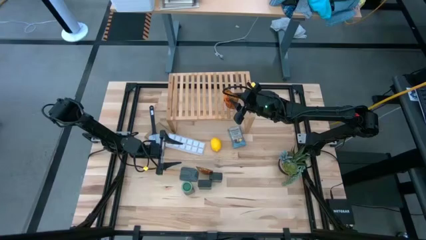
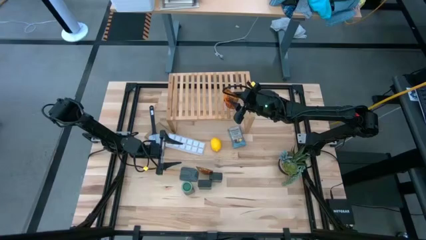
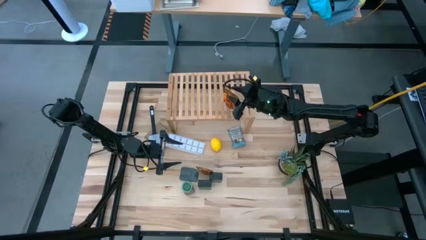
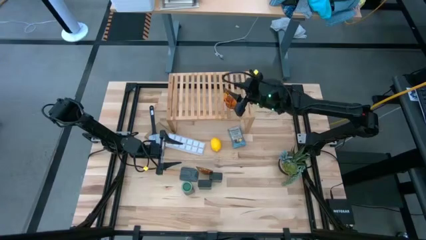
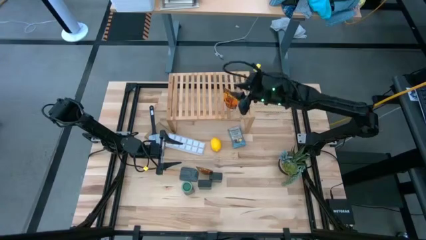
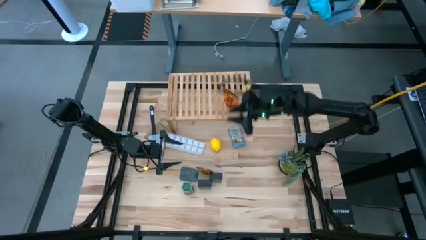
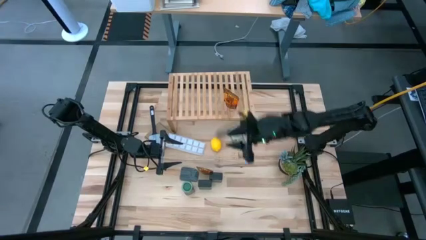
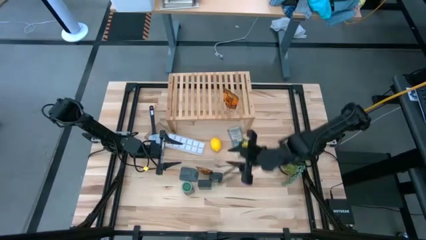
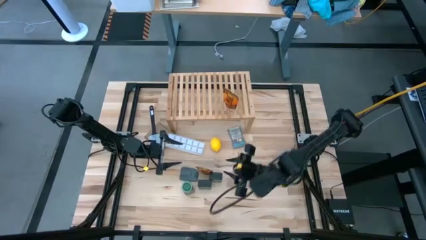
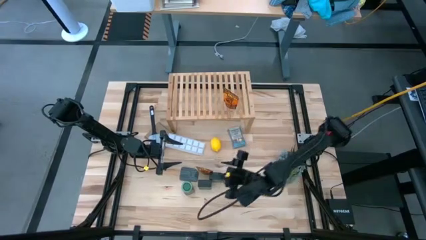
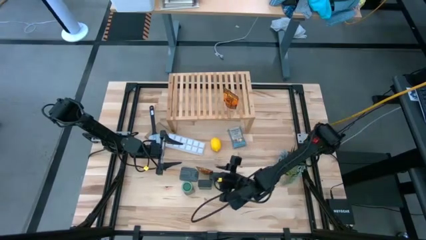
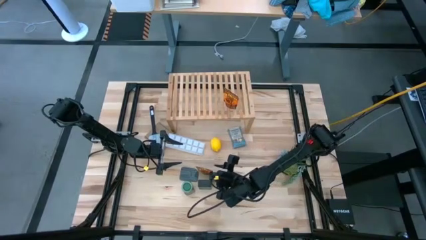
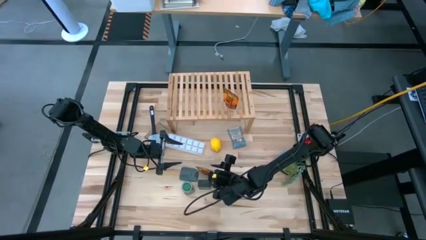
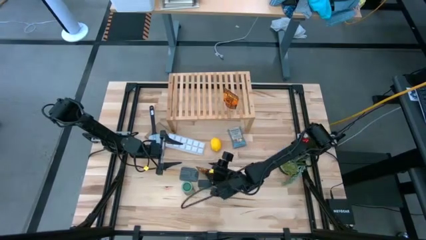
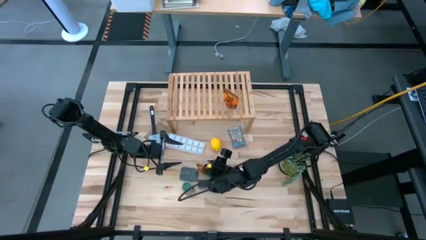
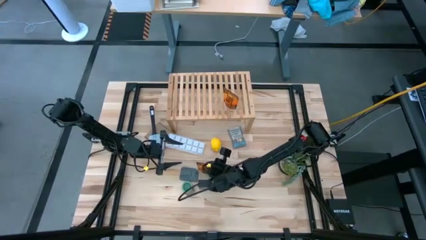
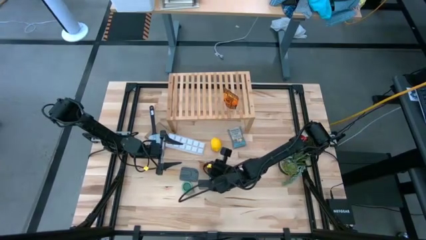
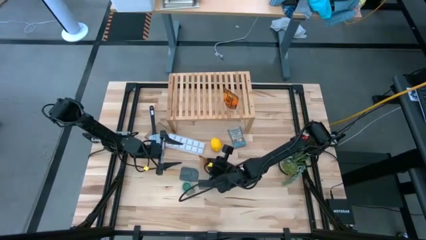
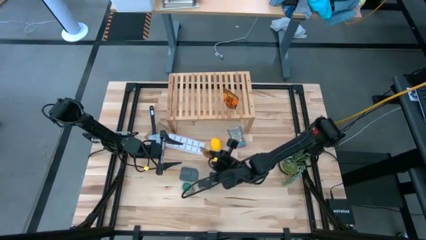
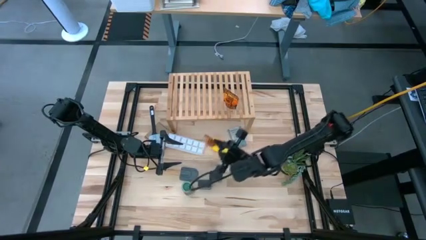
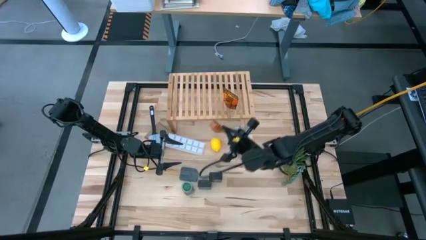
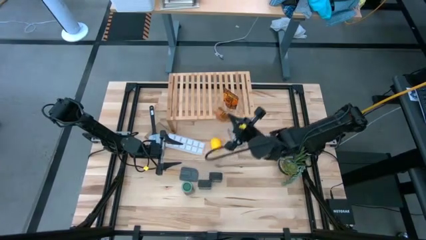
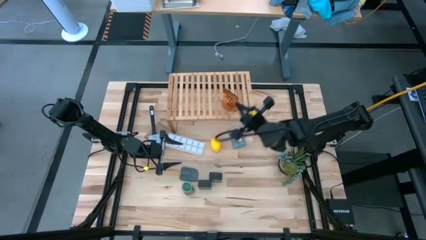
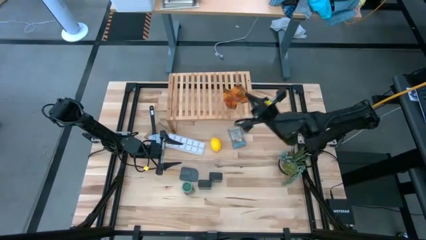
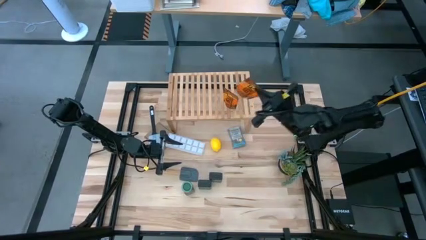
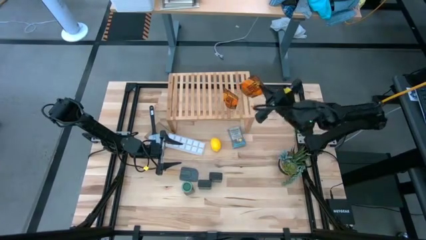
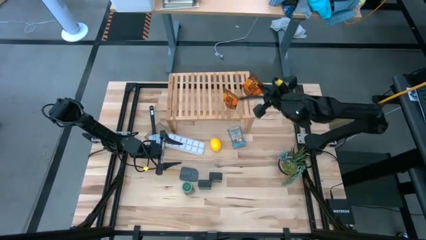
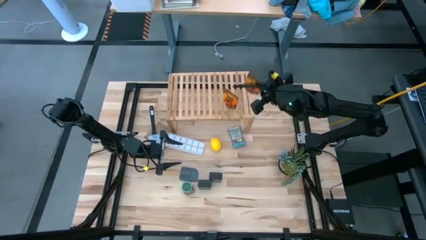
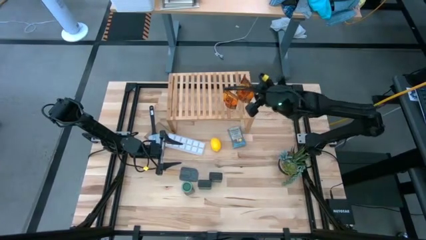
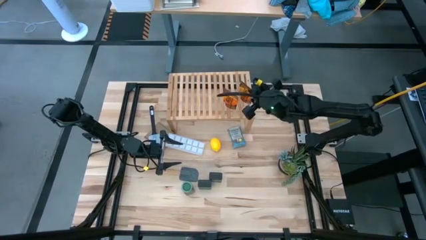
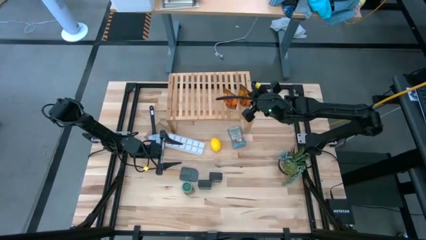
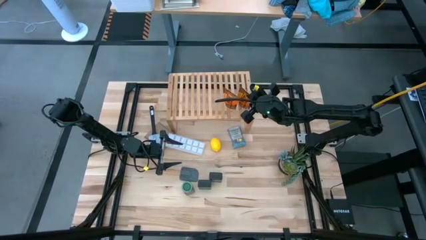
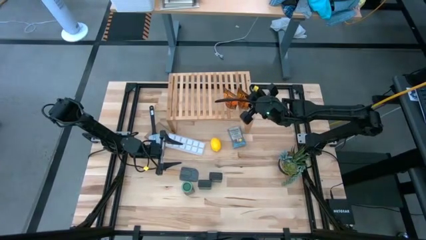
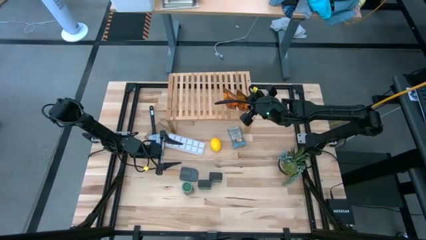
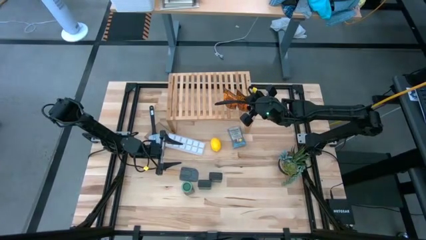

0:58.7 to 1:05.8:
Task: Shelf spices
Put the orange seasoning pack on the shelf

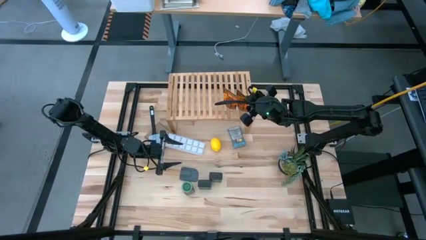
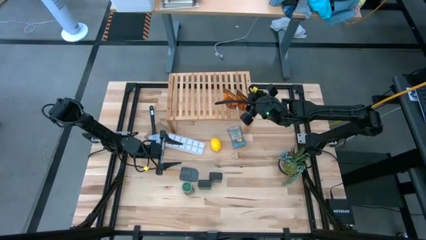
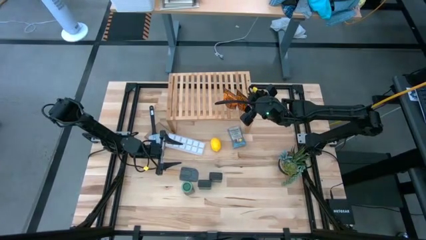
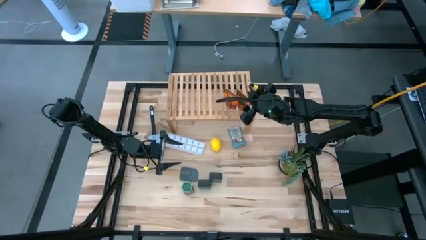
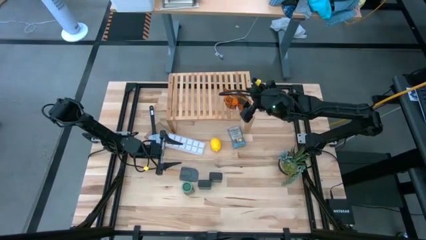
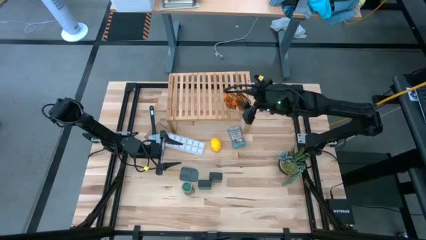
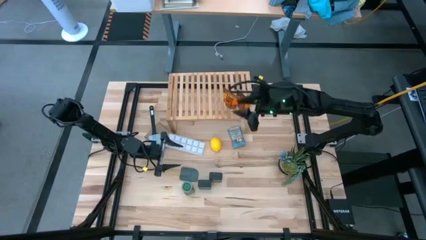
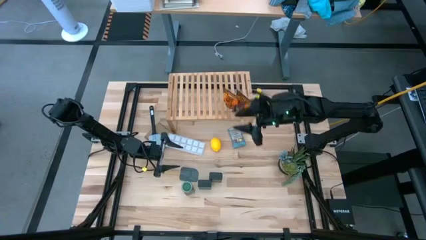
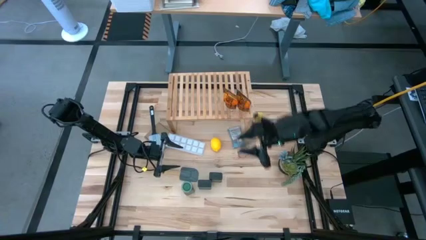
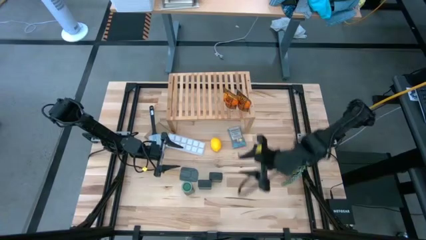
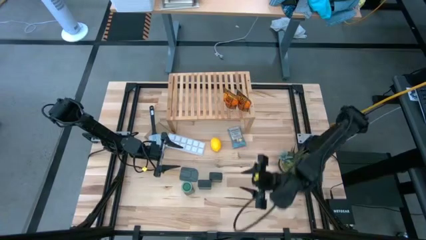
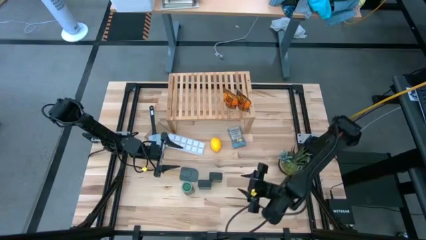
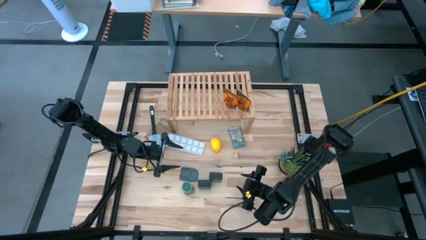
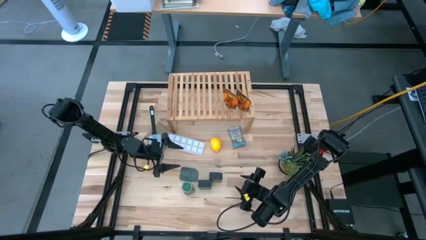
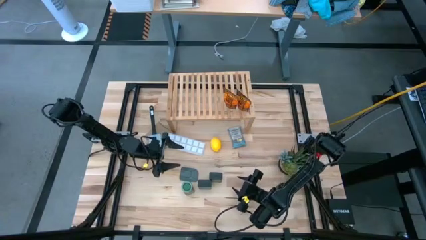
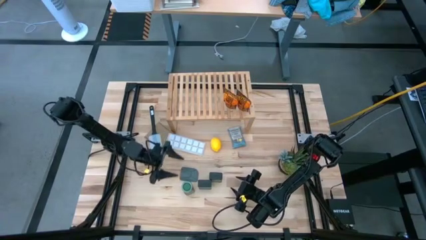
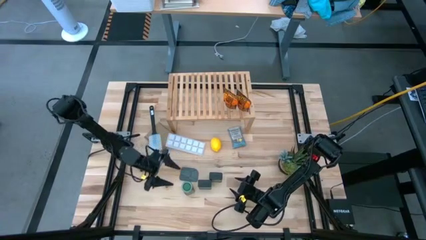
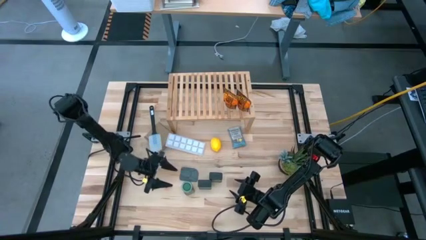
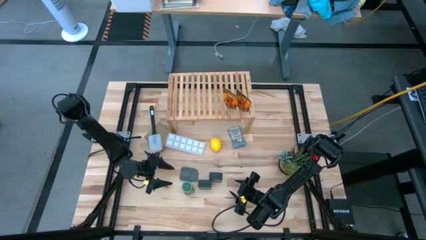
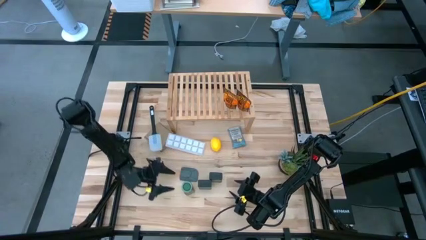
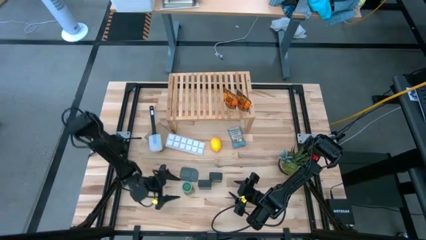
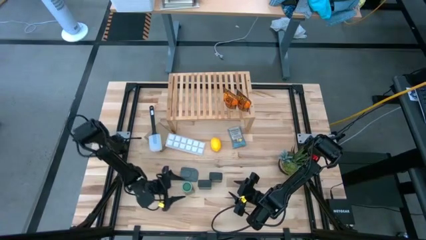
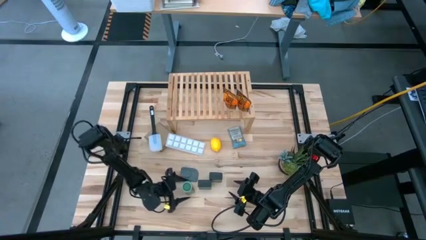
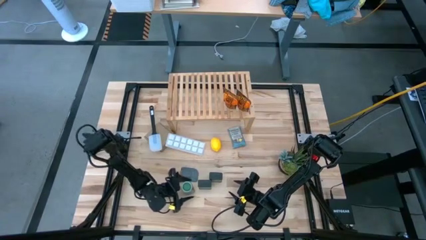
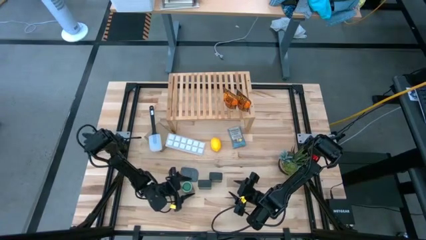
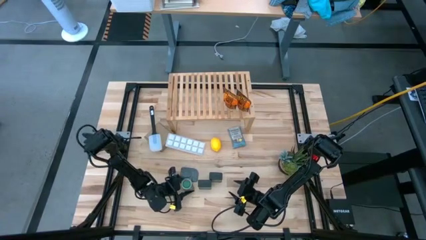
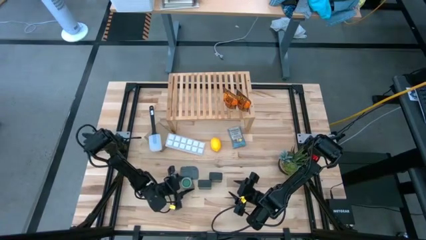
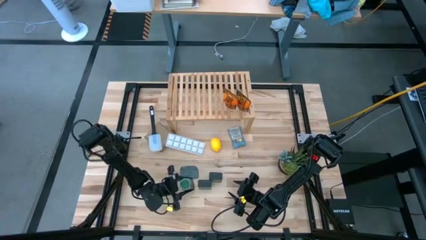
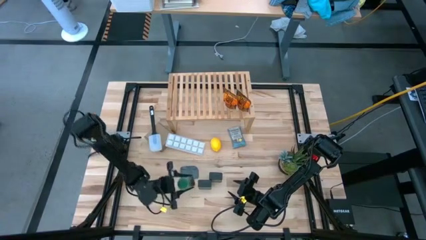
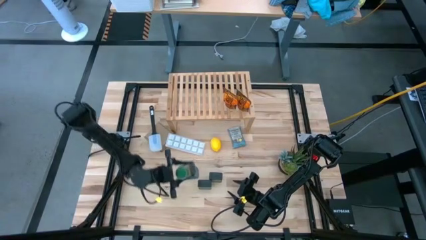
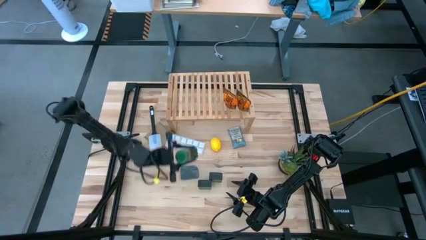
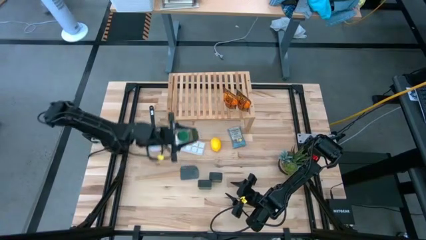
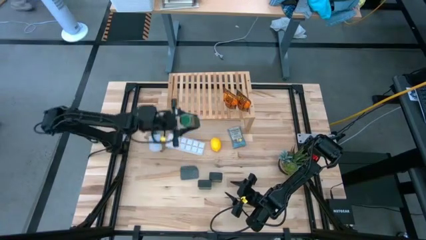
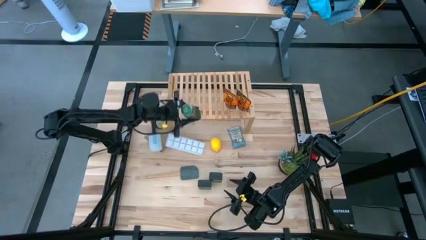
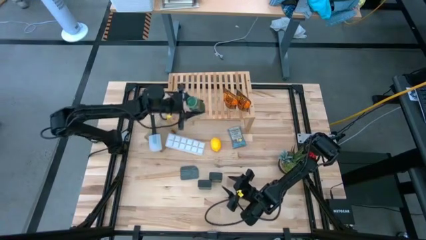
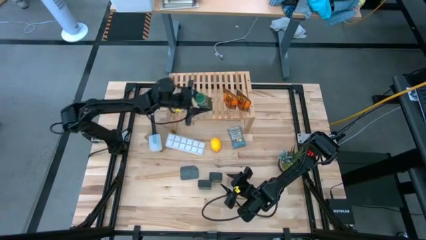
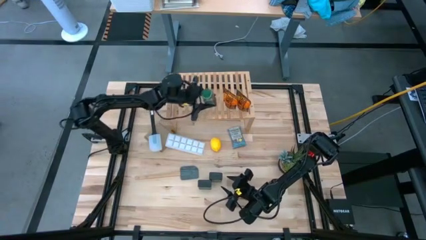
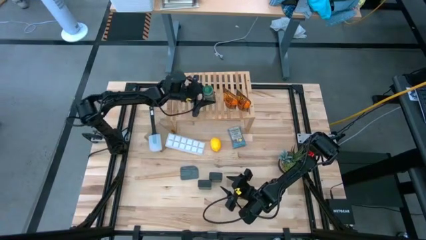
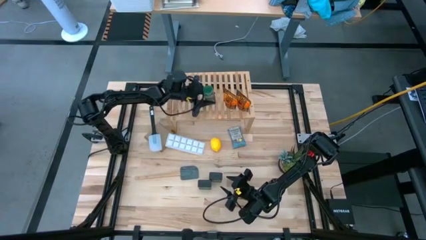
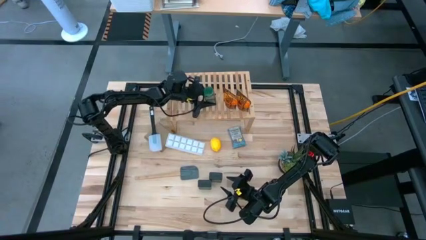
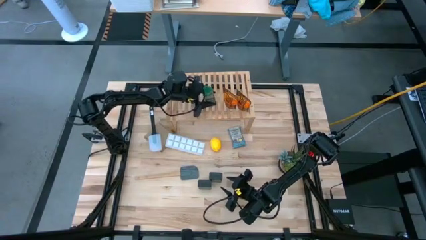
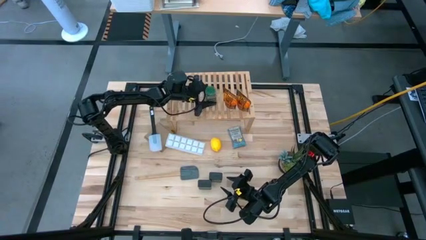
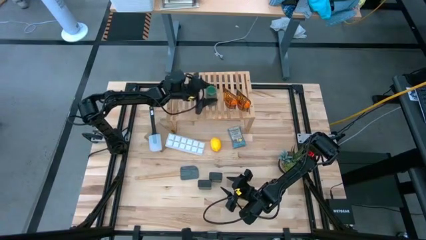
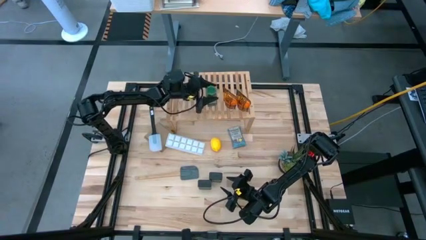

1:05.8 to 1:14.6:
Put the green seasoning bottle on the shelf
